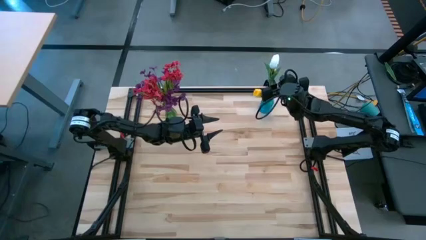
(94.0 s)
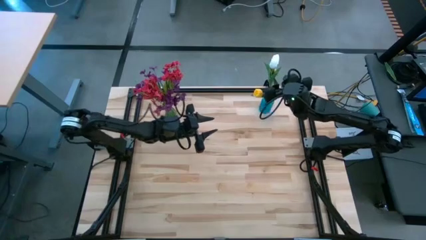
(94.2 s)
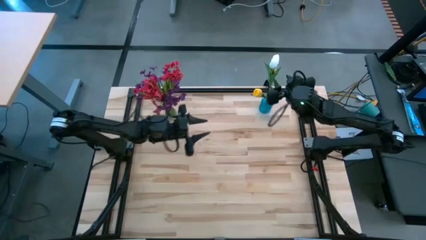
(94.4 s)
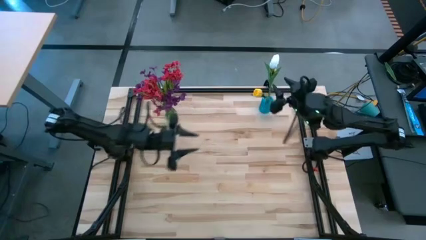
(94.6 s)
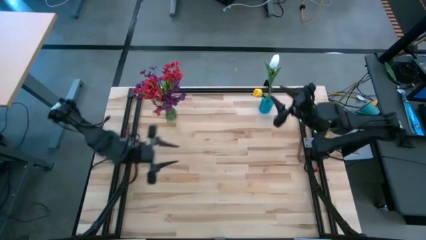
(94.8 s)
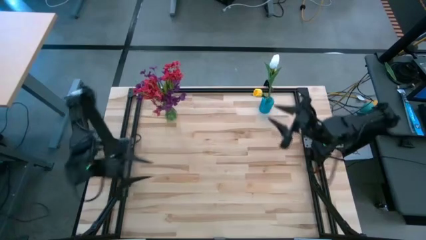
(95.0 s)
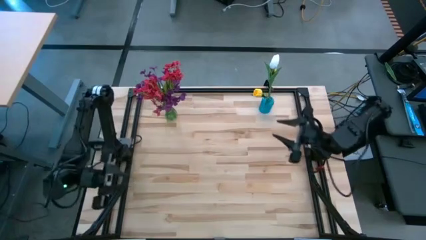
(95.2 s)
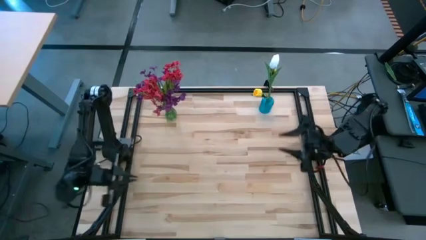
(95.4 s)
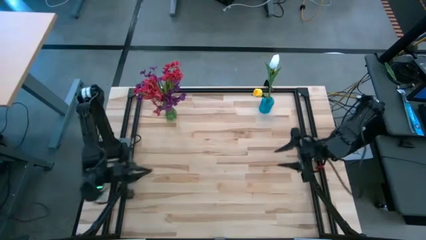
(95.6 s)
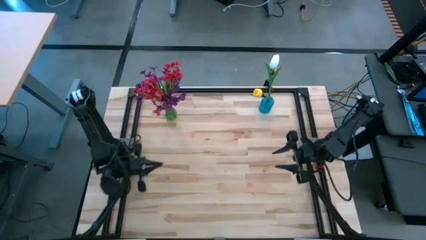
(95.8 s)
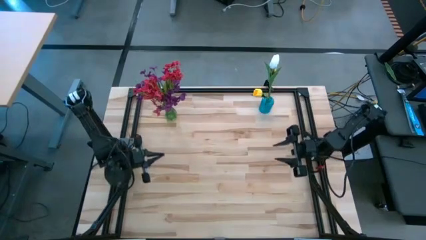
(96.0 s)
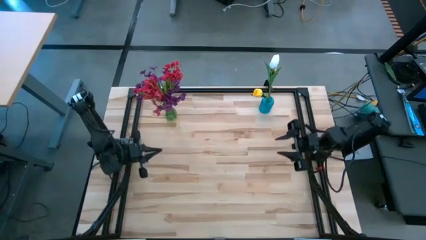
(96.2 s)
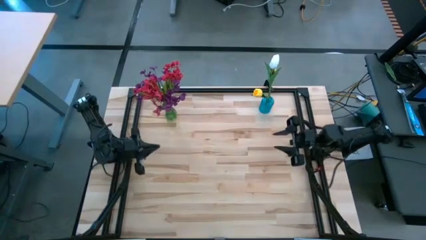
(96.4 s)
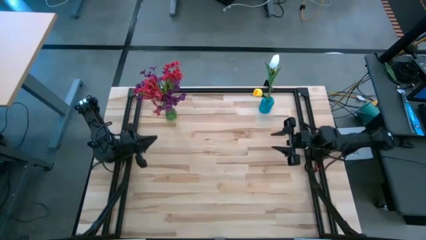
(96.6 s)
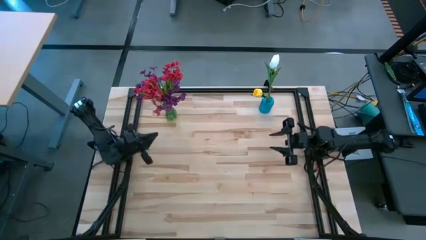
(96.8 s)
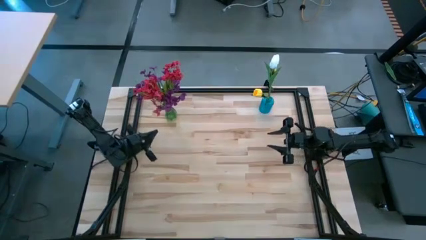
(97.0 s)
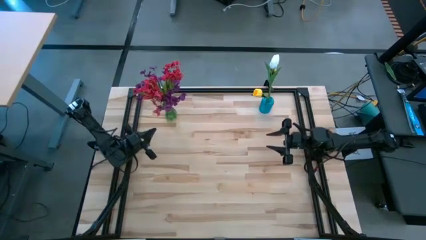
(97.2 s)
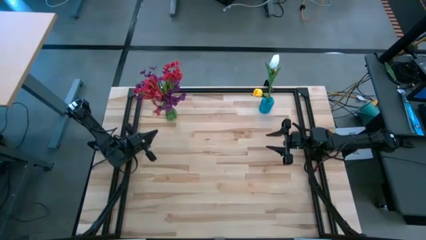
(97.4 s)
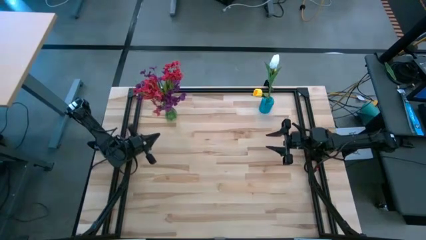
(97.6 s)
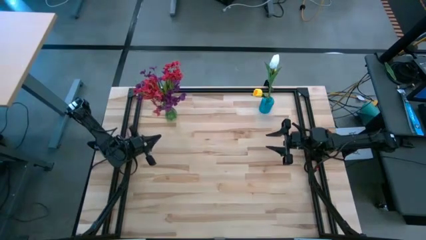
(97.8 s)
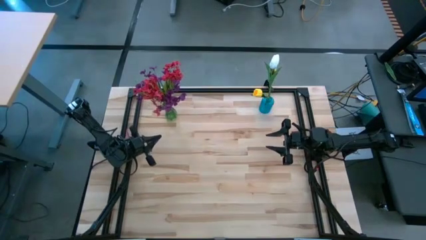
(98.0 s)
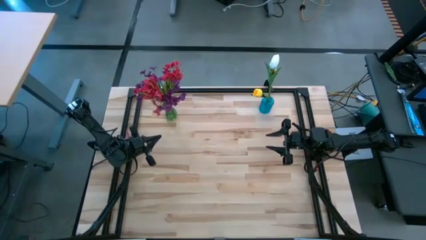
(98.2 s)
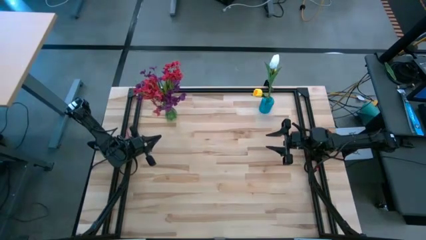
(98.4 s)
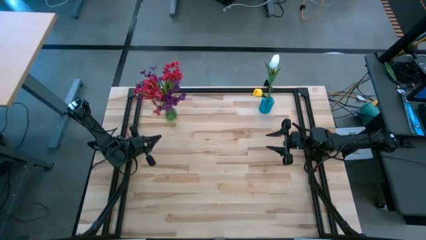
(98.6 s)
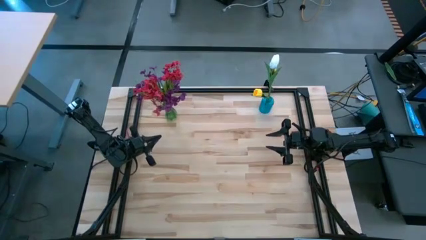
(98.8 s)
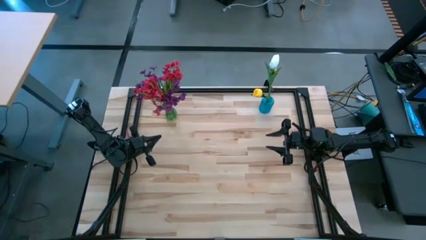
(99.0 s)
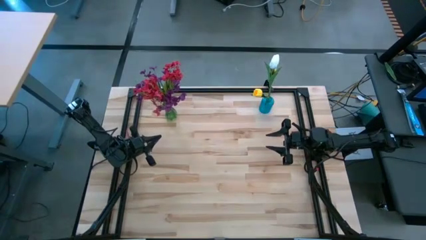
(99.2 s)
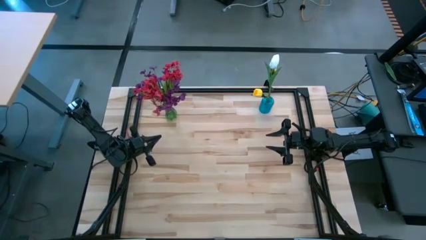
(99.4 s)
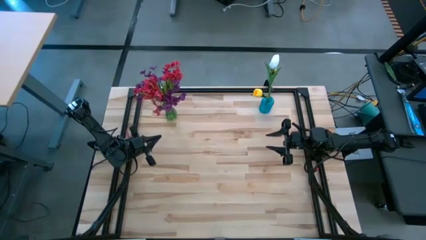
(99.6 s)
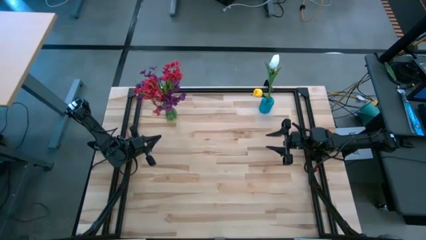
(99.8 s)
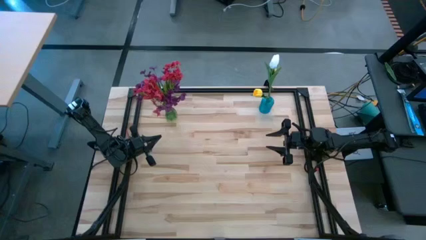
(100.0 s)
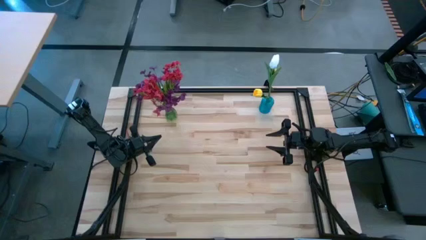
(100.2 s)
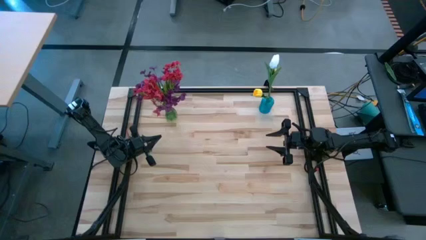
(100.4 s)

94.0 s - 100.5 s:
Task: Sort flowers into vase by color
Return to Home Position

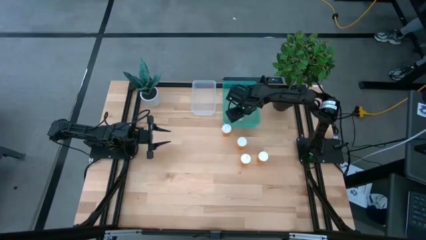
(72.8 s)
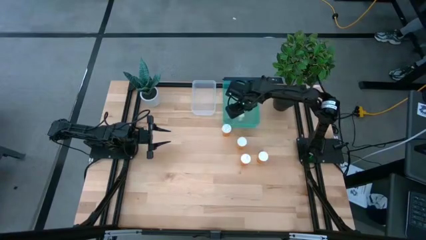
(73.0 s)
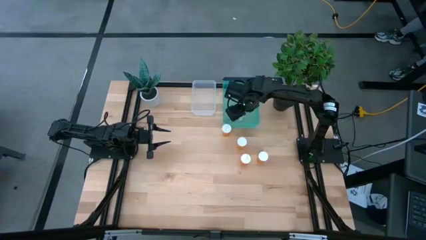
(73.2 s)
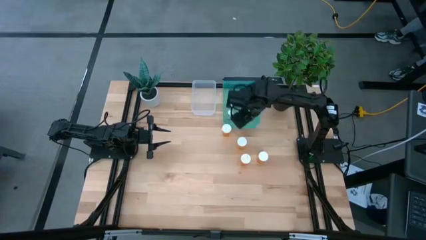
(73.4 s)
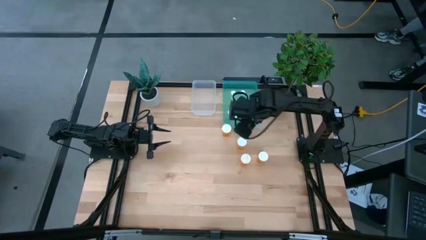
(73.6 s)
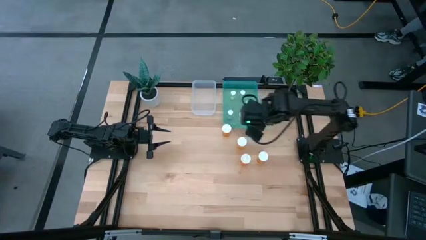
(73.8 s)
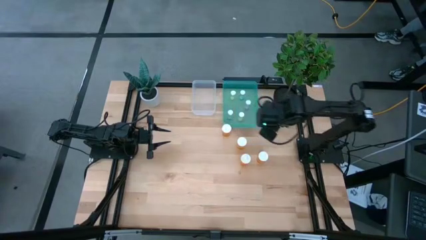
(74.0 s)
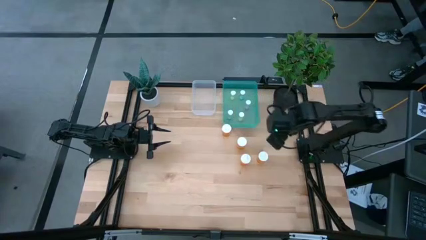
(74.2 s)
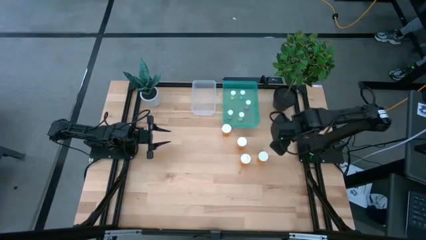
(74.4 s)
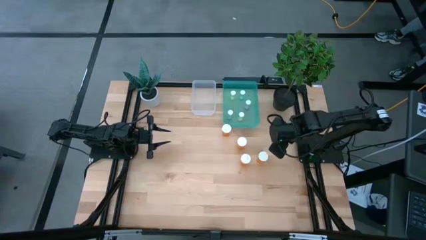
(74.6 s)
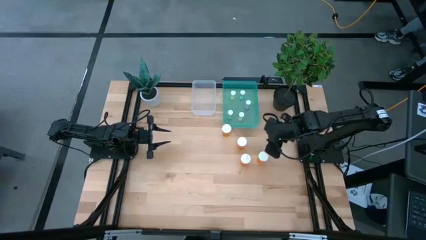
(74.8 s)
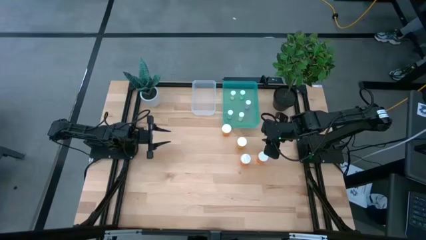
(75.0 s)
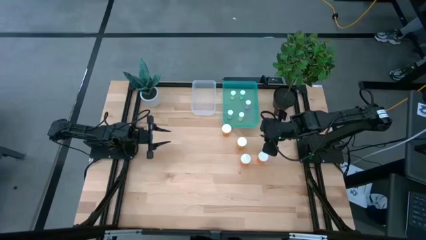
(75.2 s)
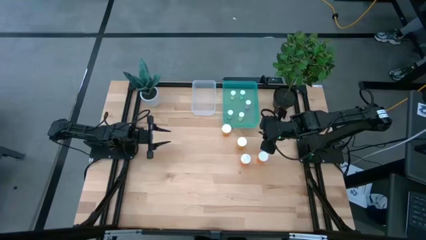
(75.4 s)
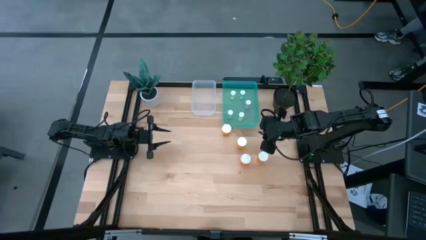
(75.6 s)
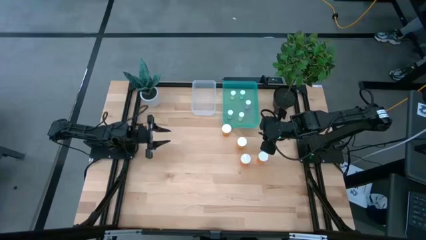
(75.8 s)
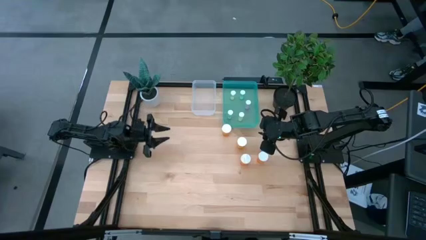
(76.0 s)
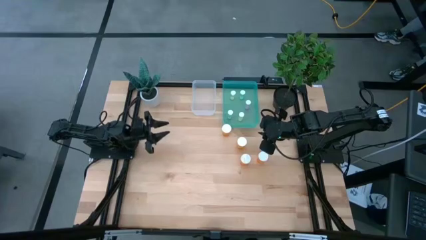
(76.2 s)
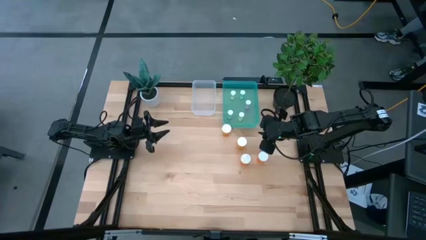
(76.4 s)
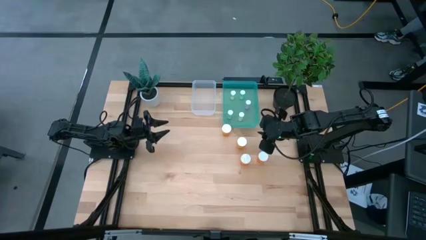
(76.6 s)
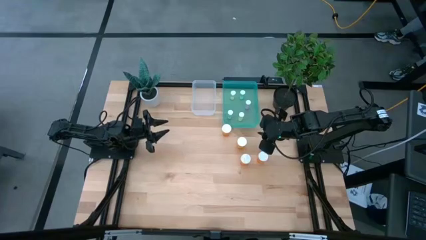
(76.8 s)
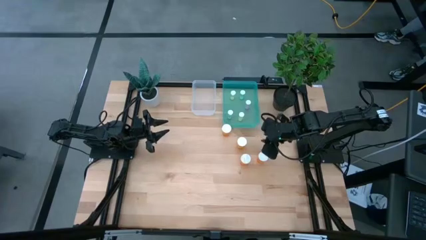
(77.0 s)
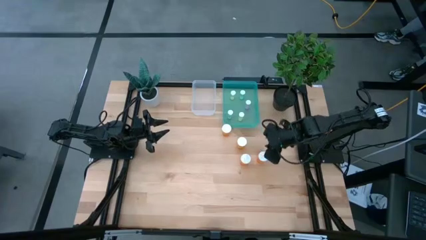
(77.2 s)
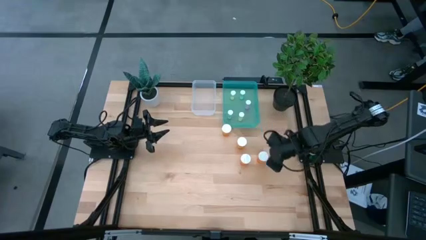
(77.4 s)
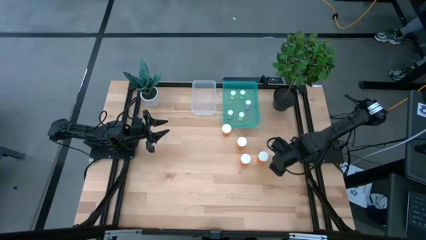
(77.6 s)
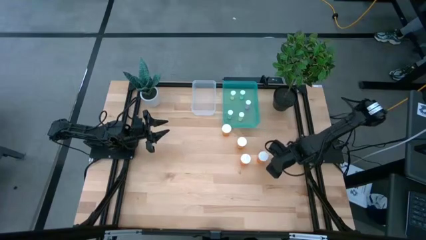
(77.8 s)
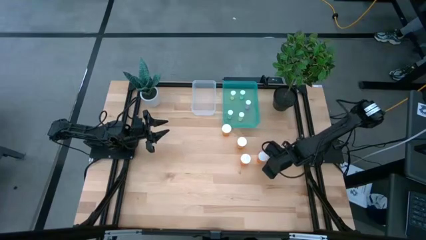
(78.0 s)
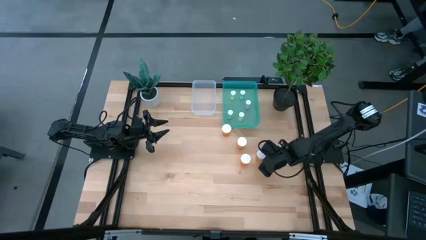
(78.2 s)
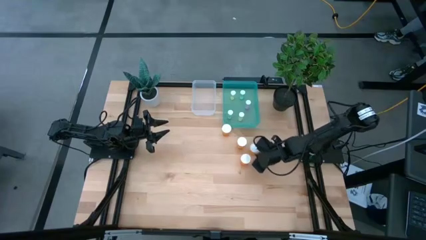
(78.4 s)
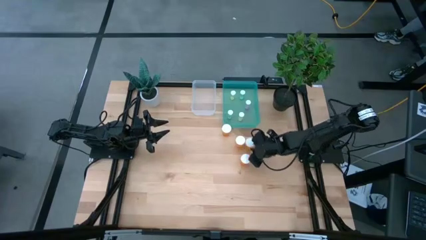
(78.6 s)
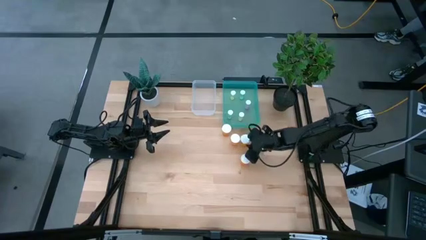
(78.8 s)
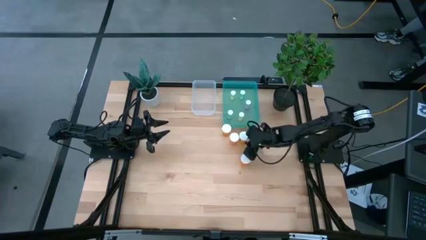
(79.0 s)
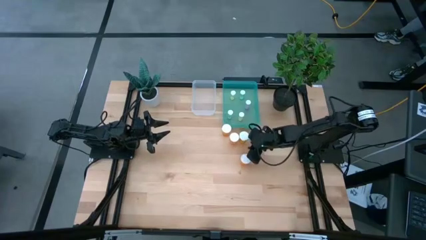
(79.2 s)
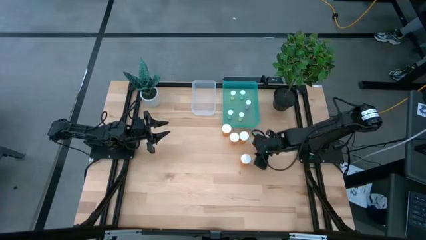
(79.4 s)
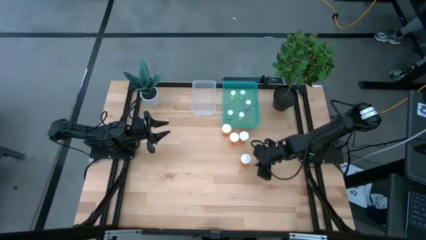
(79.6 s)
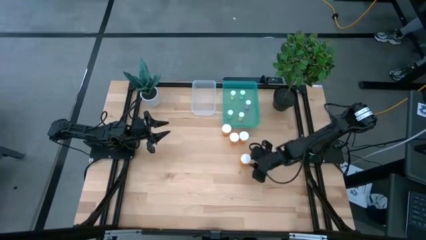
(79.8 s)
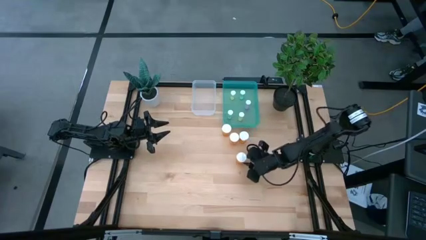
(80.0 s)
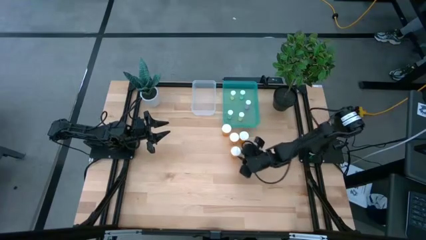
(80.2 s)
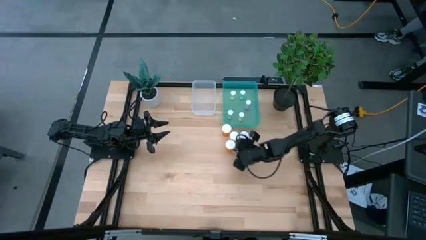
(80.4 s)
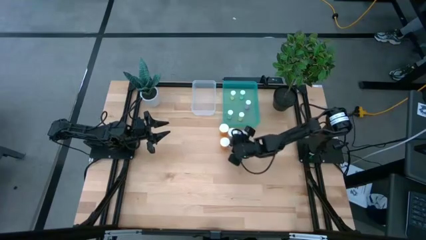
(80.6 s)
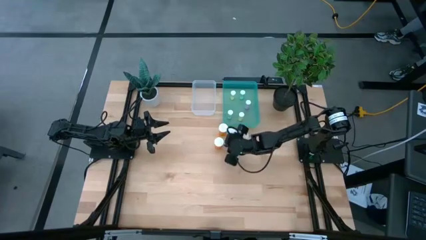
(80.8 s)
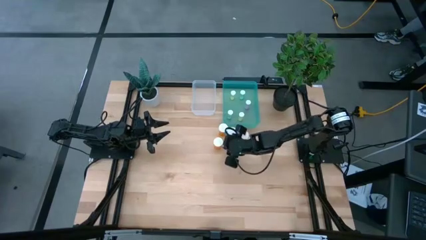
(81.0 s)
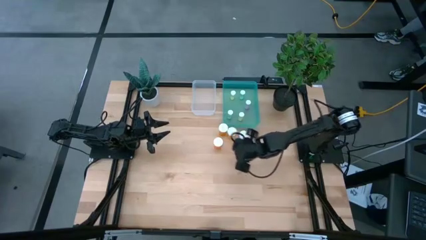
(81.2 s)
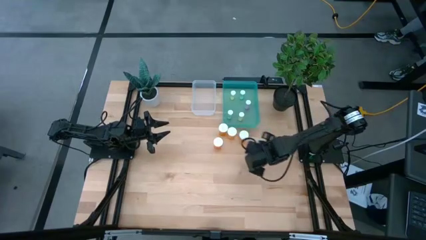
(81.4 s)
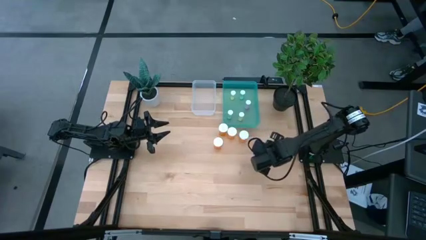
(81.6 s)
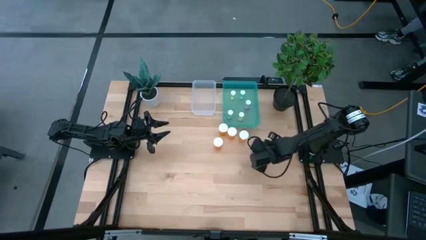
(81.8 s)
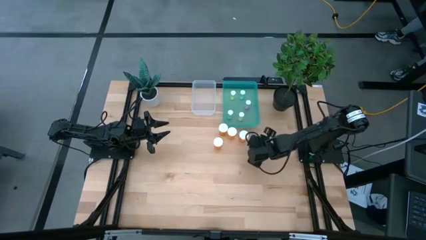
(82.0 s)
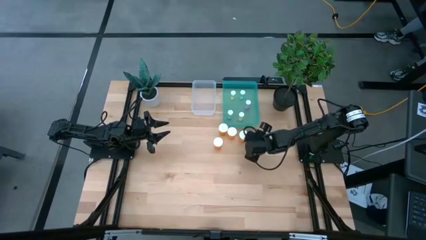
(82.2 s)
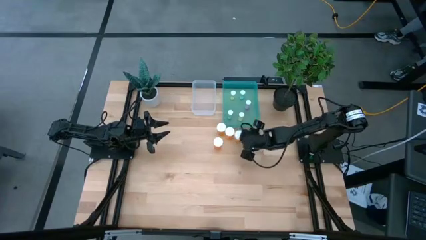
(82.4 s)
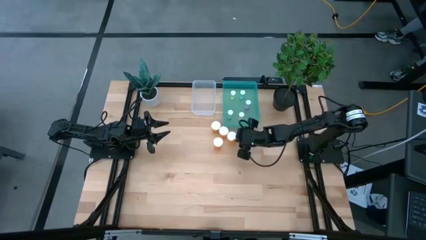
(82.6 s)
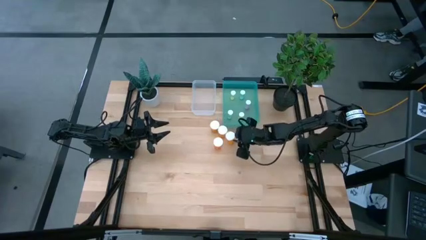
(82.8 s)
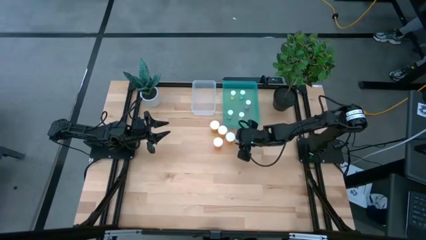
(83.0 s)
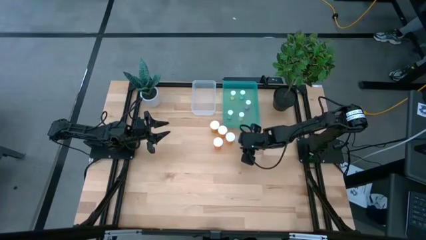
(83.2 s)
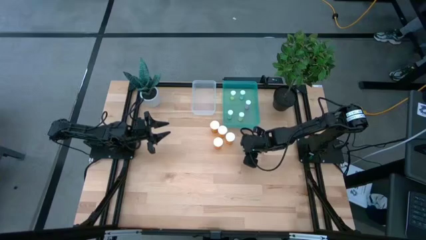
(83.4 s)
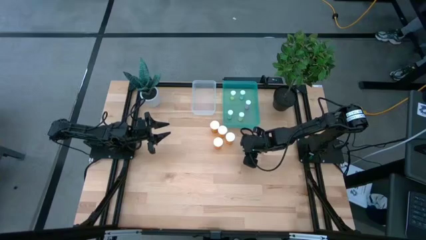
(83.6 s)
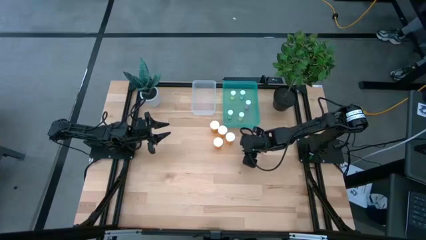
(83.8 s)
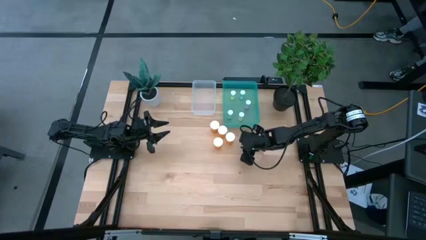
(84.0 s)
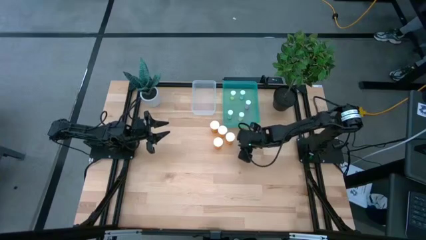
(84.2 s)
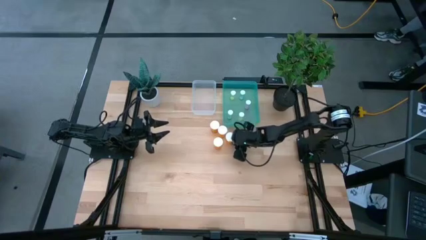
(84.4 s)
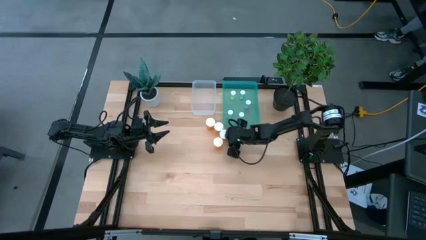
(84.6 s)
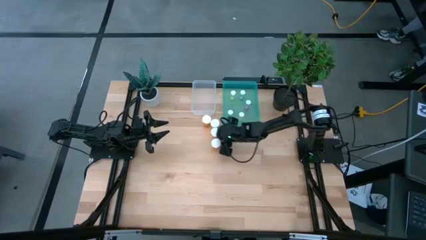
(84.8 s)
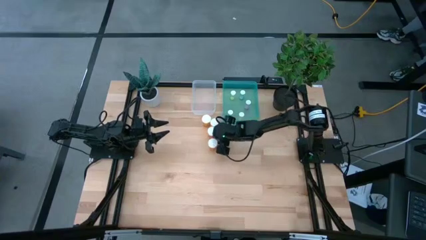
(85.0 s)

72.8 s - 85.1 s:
Task: Pick and place medicine bottles into bin by pill shape (circle, oval)
Move the orange capsule bottles to the center of the table
